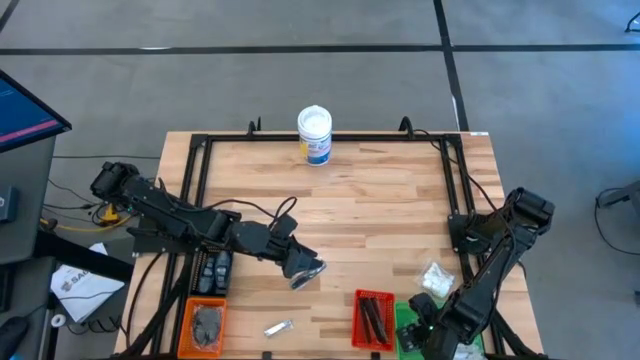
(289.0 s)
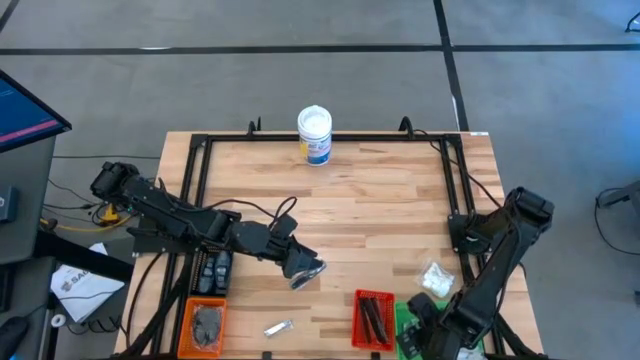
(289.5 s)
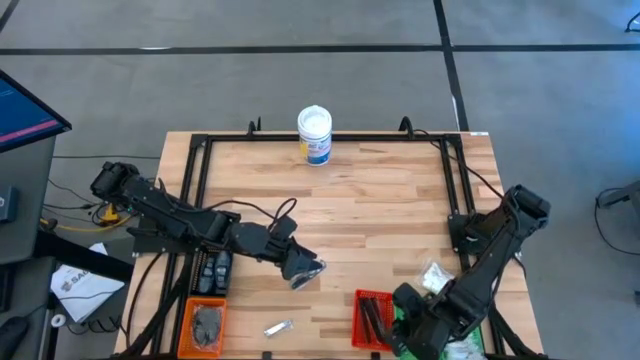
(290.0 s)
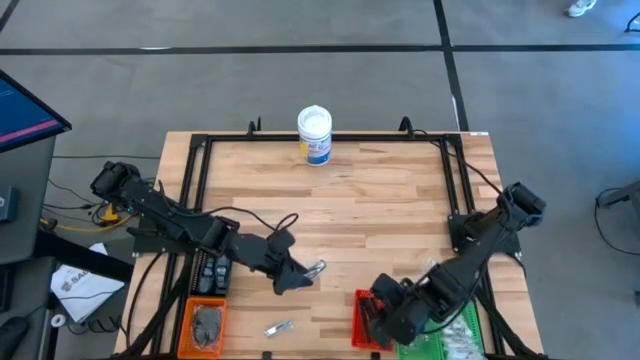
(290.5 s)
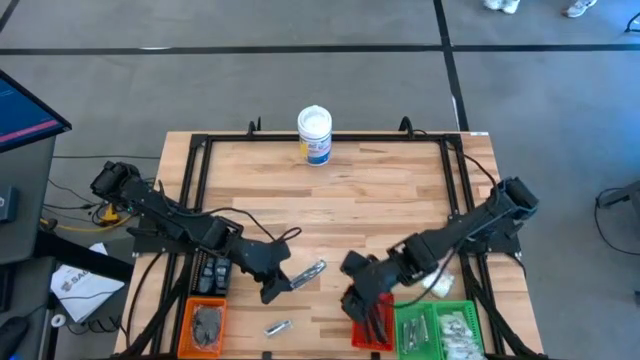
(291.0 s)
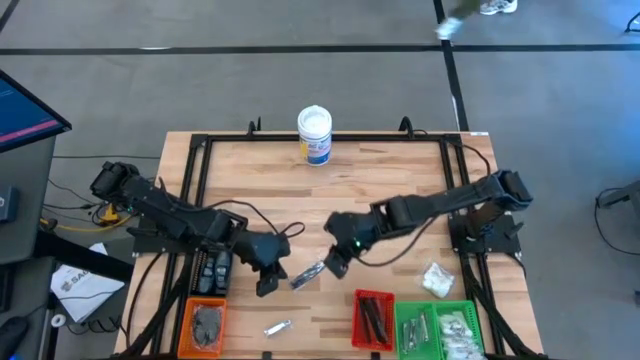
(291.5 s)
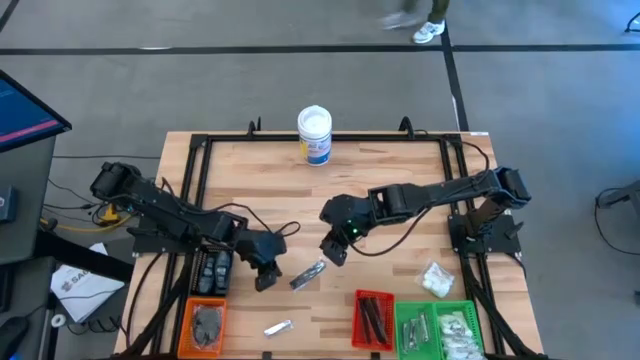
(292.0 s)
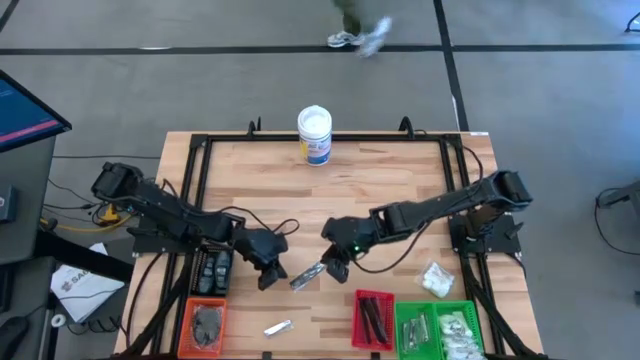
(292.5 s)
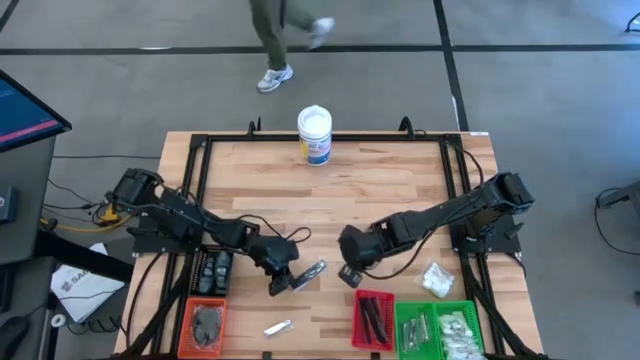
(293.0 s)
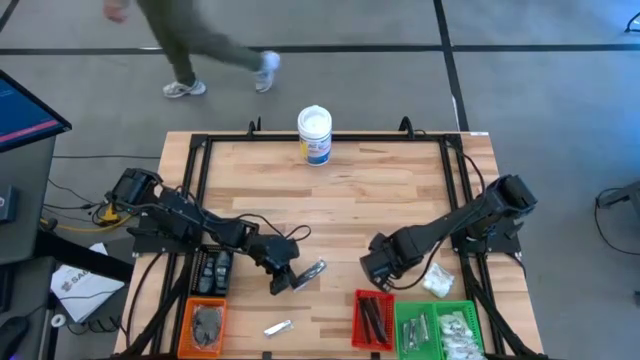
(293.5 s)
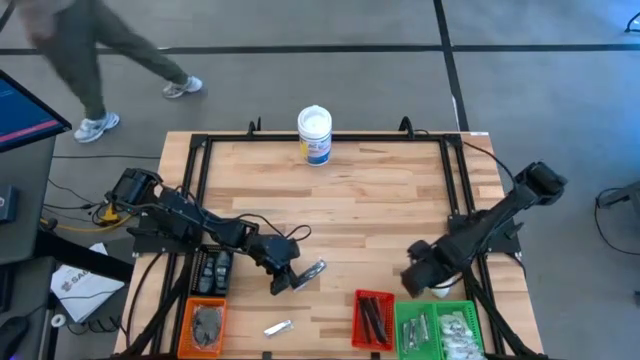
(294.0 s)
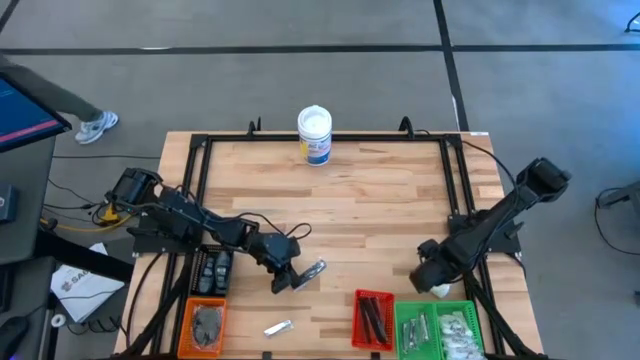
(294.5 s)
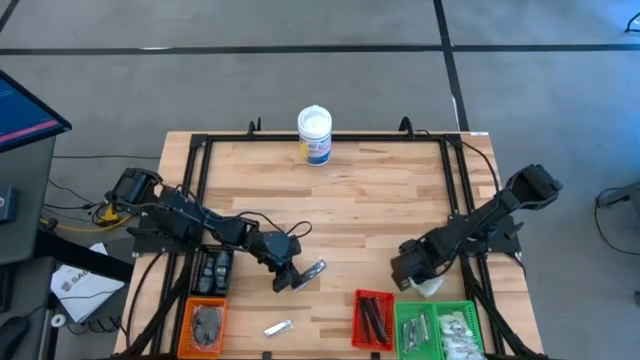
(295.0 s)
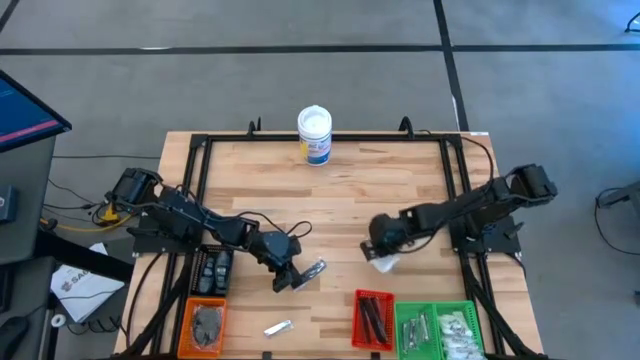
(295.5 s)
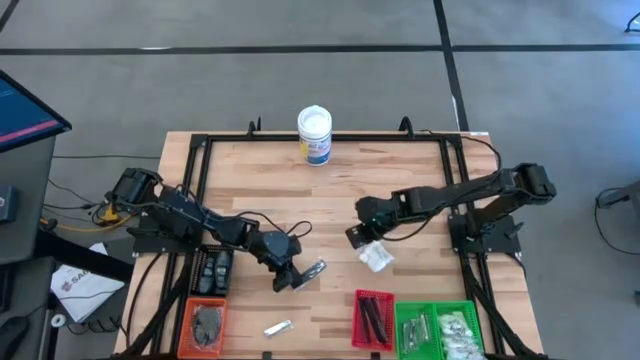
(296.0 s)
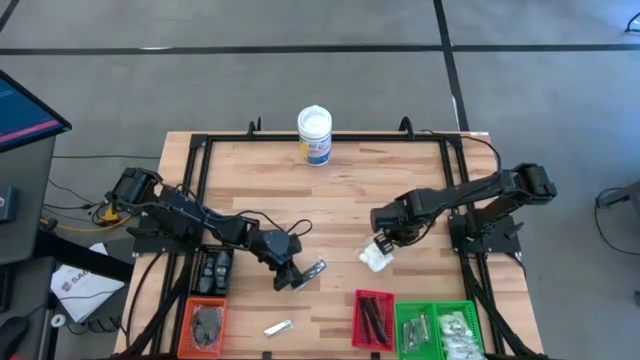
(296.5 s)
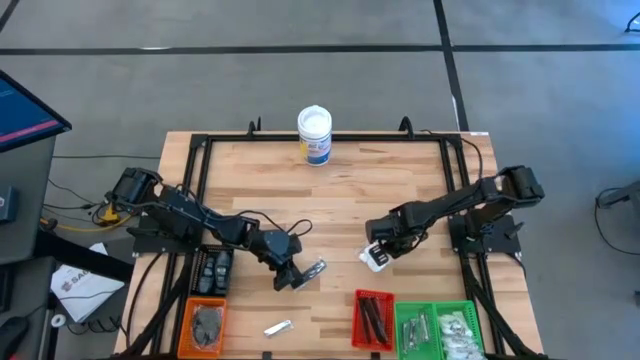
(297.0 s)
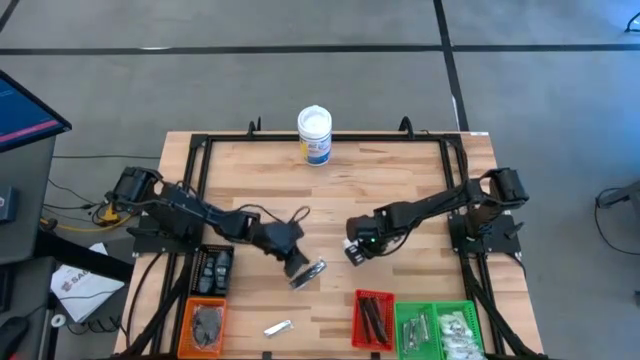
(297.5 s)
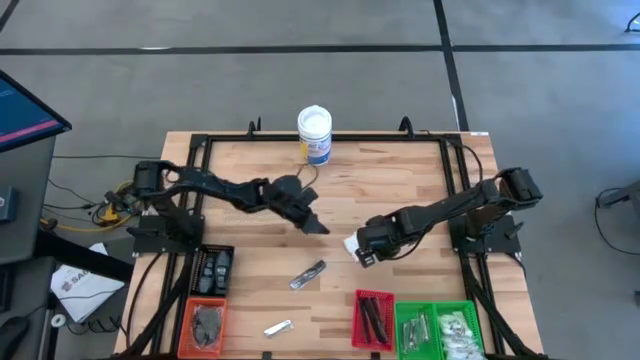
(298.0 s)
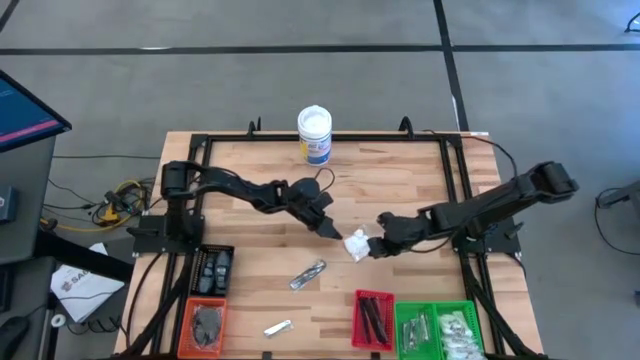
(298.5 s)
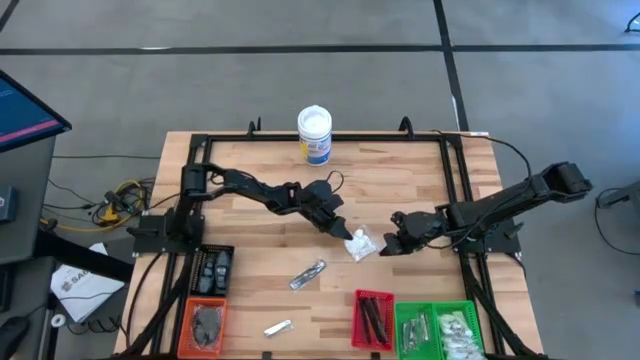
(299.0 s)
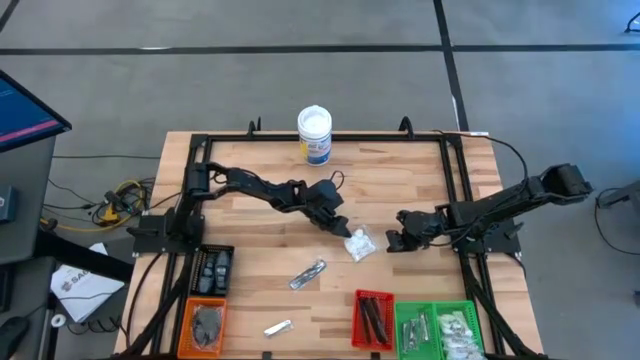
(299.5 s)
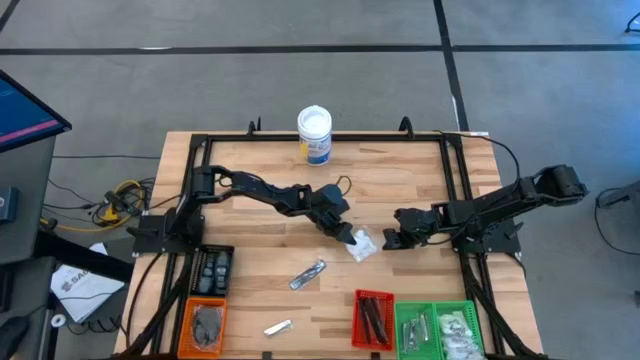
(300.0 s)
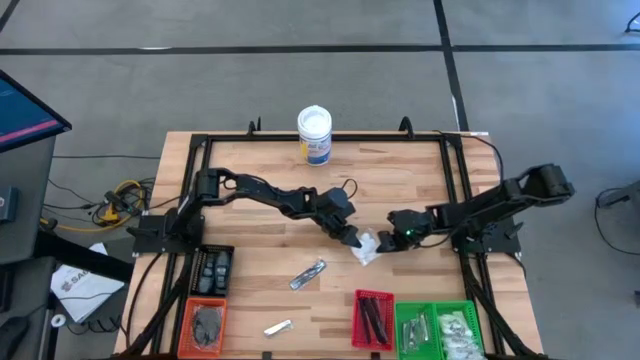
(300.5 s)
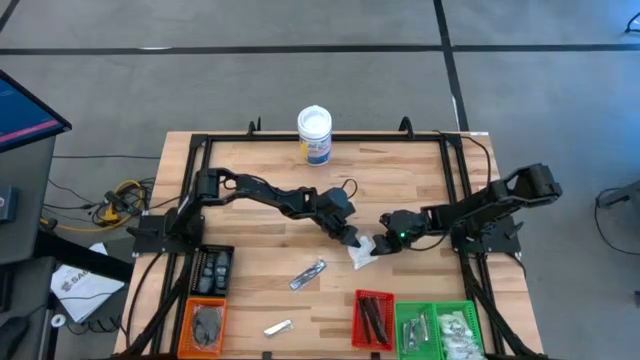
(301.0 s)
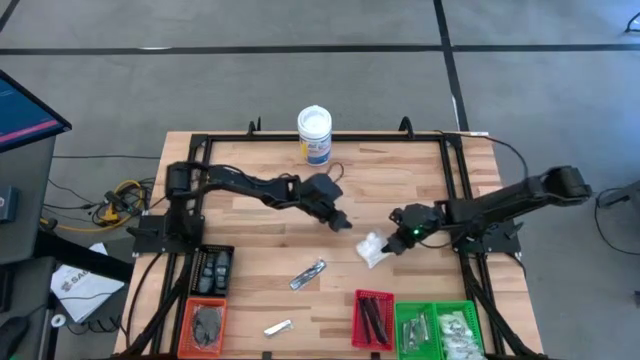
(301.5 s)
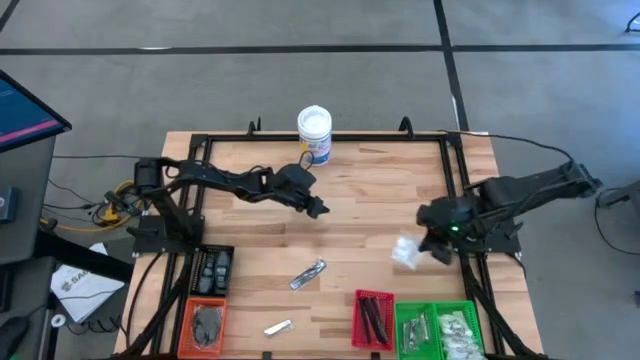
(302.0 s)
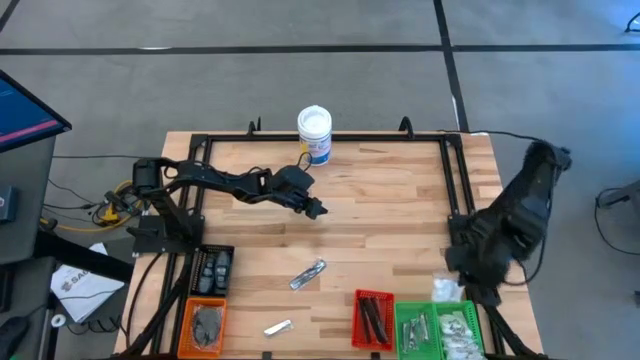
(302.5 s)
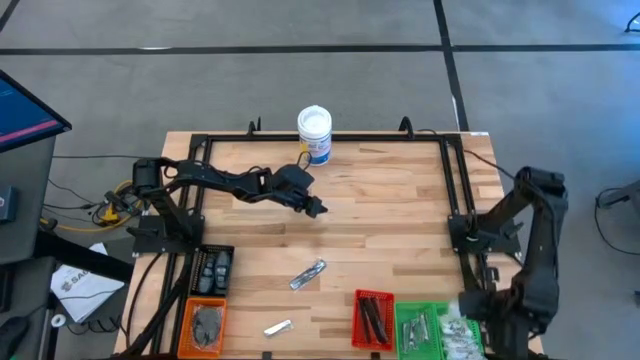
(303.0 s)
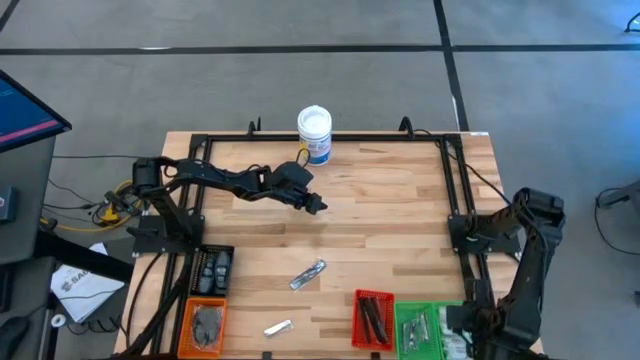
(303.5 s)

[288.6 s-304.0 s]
Task: Pick & Place Travel size toiletries
Put the white cotton pack into the right green bin

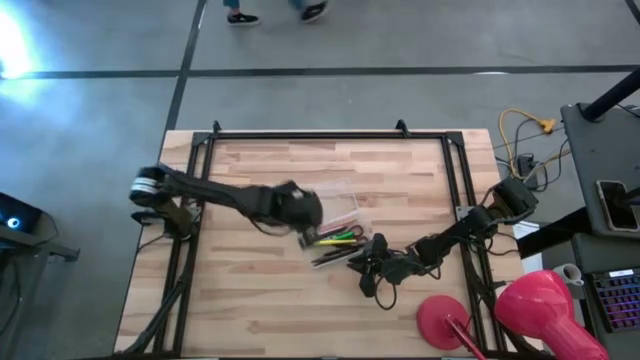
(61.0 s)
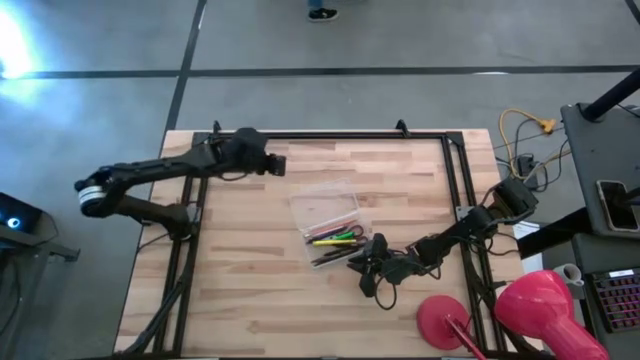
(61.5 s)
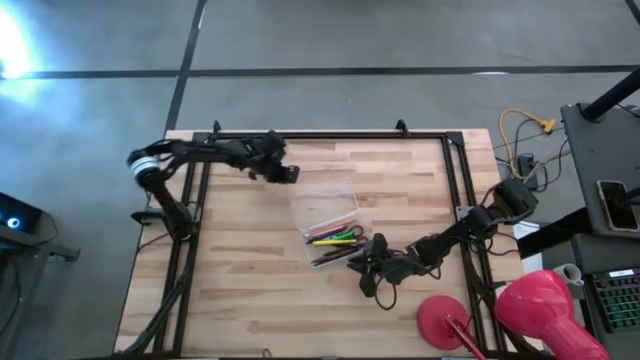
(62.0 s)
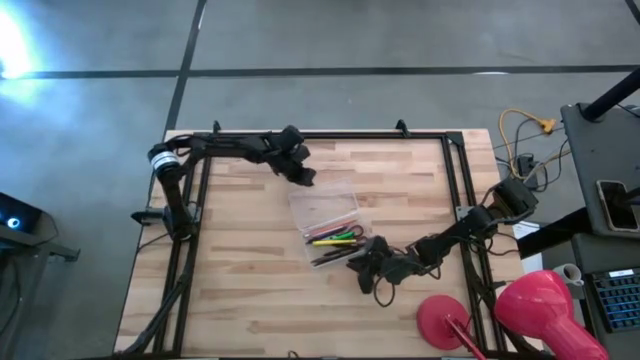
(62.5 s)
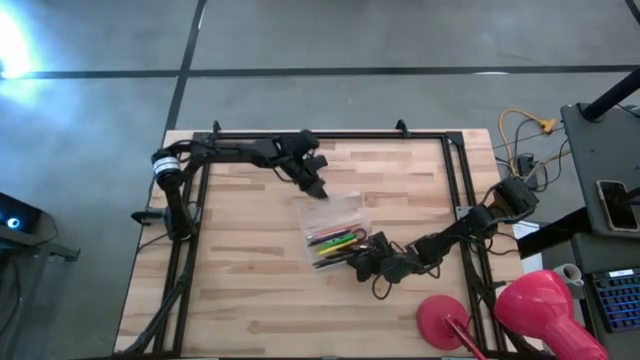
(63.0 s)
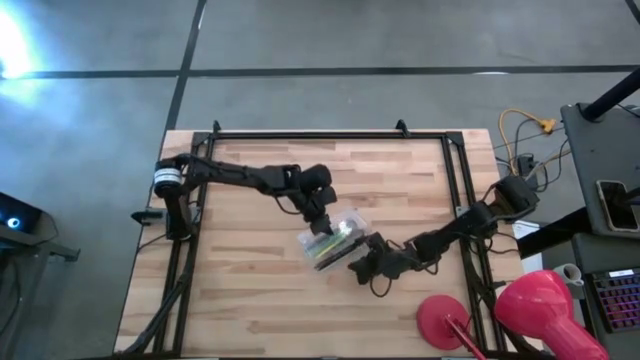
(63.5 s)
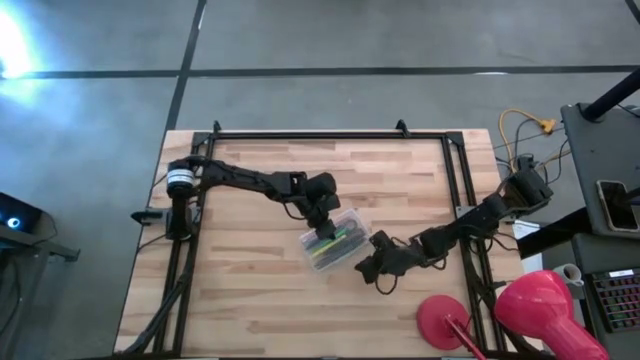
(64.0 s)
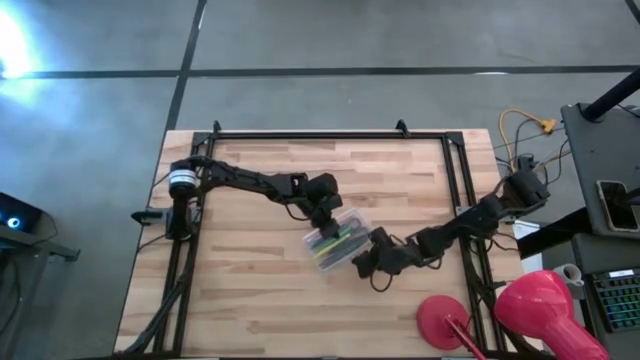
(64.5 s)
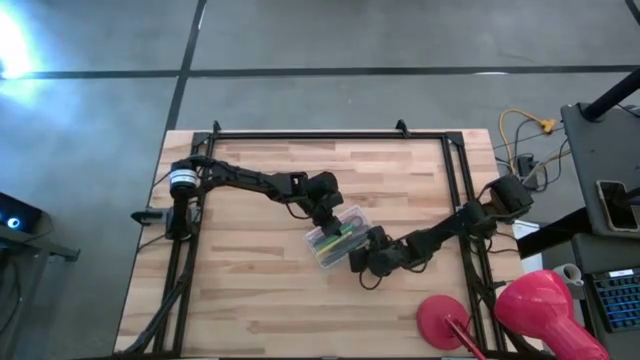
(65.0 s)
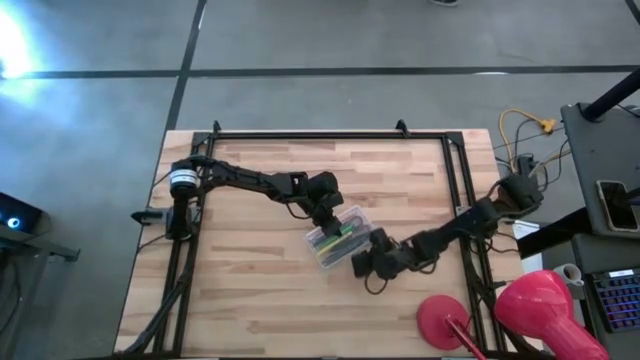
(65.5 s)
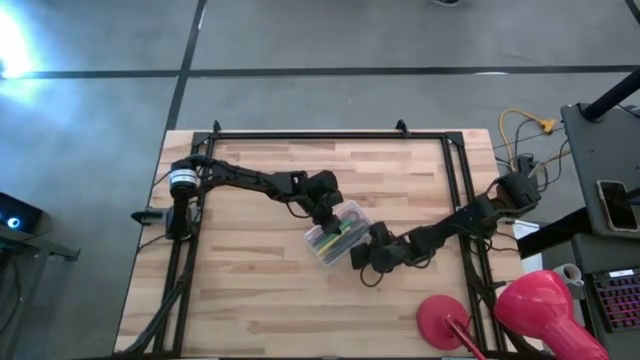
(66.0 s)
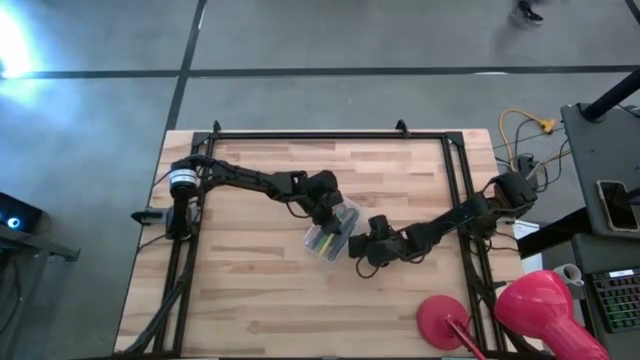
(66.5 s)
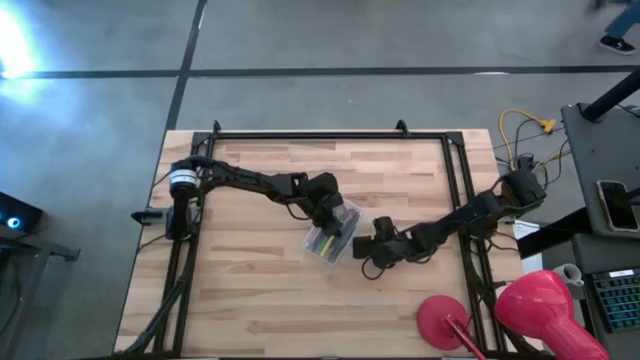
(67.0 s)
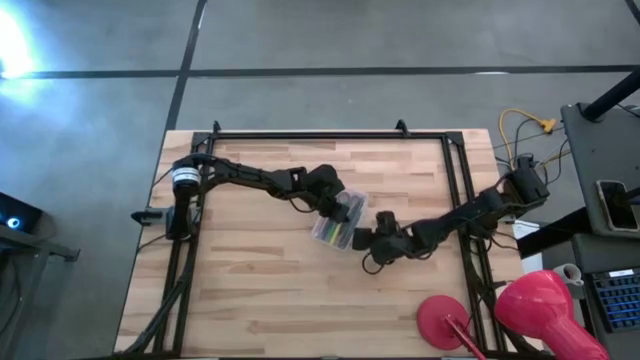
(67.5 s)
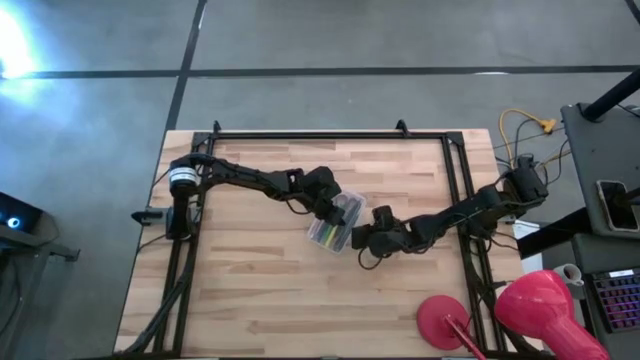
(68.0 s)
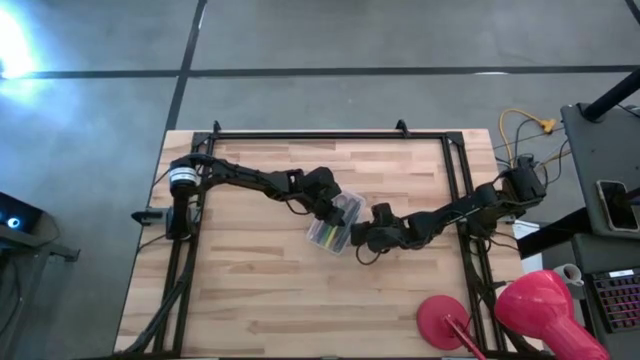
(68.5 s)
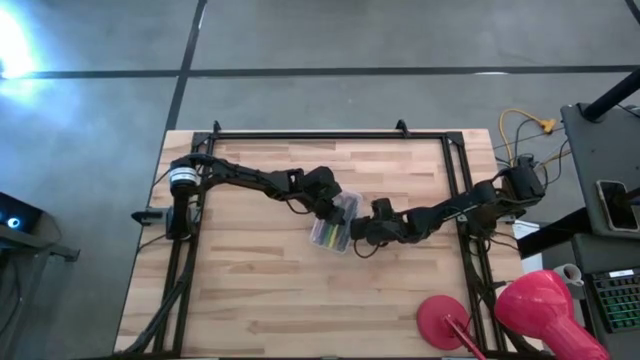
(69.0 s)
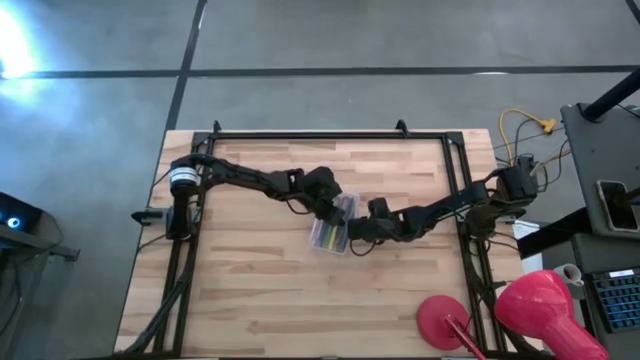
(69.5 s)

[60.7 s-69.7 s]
Task: Pick & place school supplies into a supply box
Close the transparent supply box
